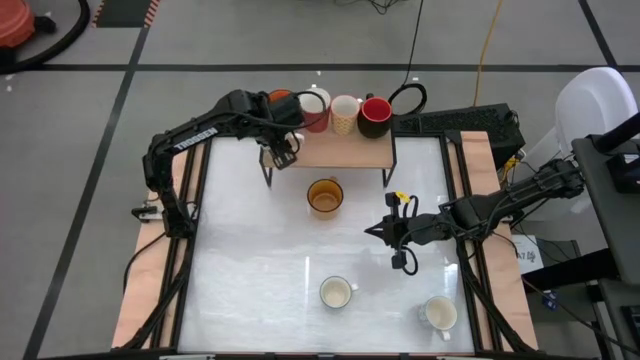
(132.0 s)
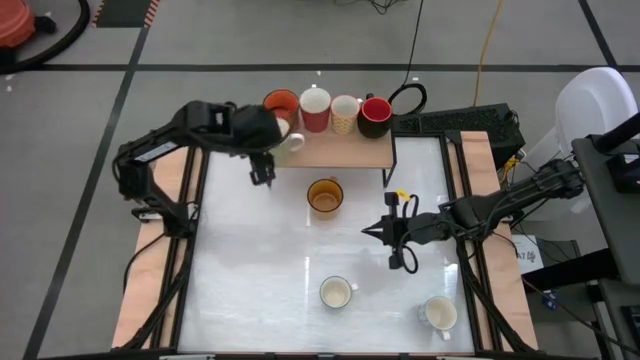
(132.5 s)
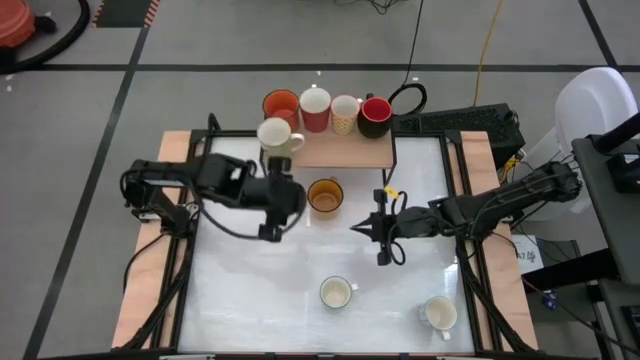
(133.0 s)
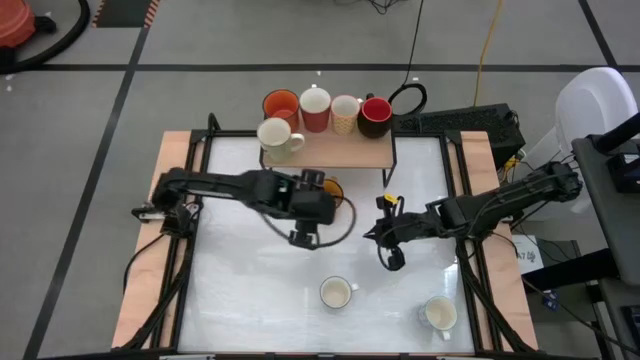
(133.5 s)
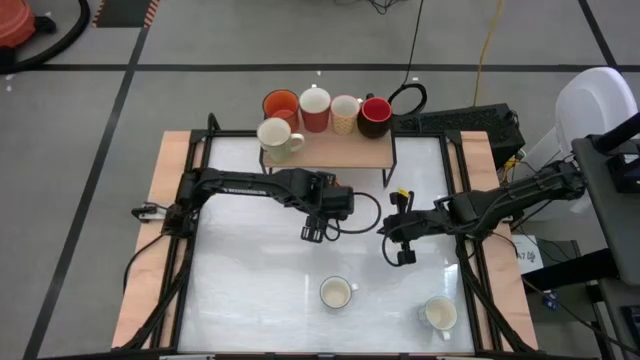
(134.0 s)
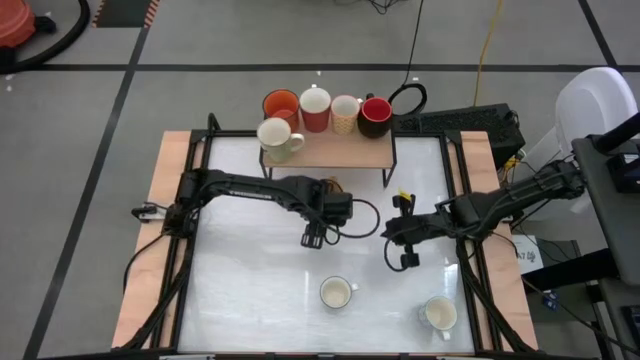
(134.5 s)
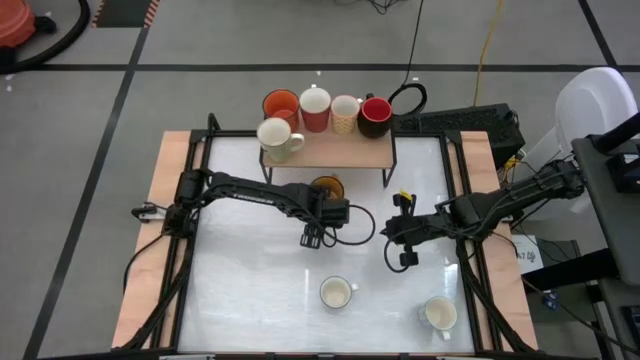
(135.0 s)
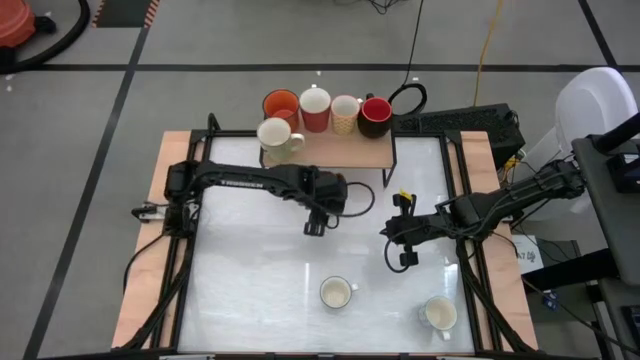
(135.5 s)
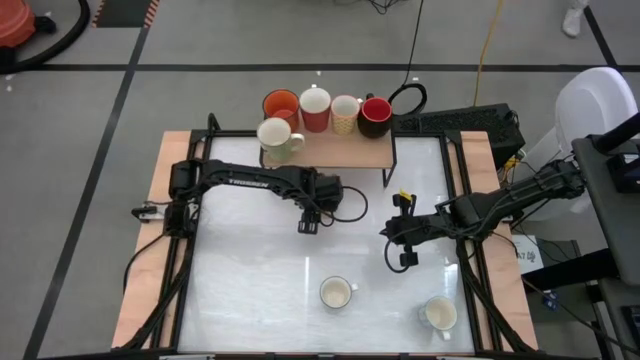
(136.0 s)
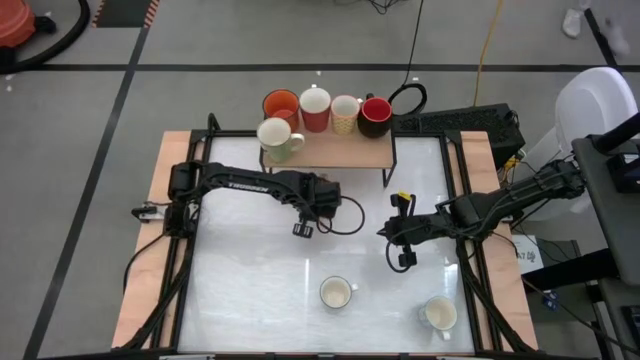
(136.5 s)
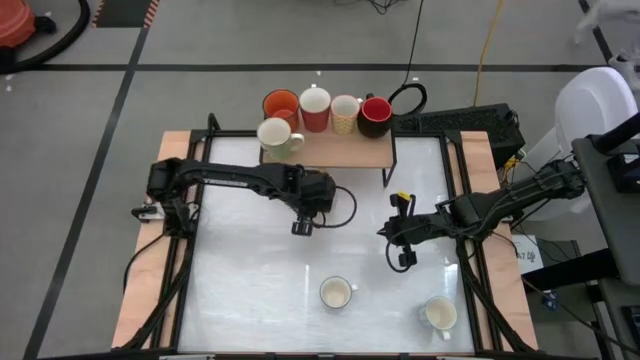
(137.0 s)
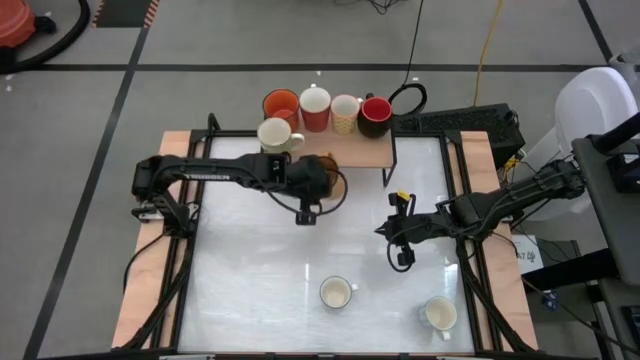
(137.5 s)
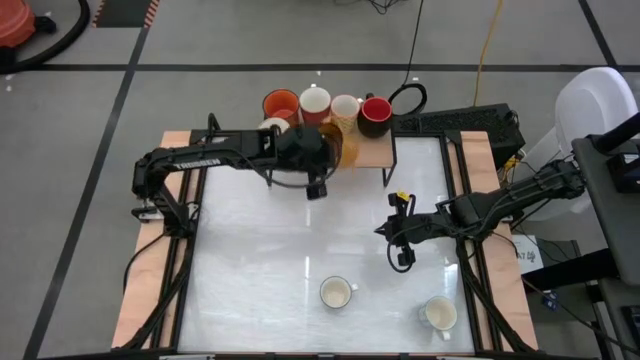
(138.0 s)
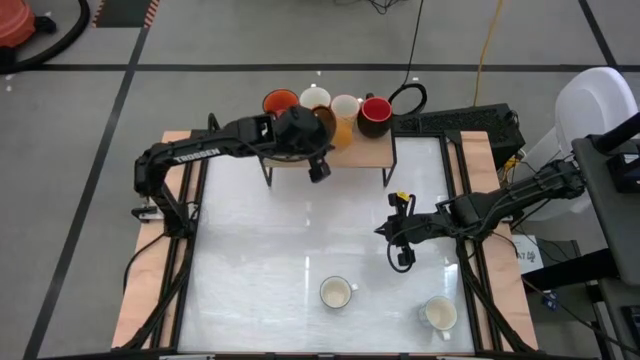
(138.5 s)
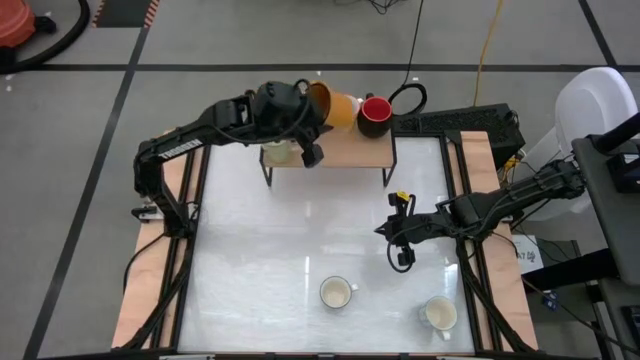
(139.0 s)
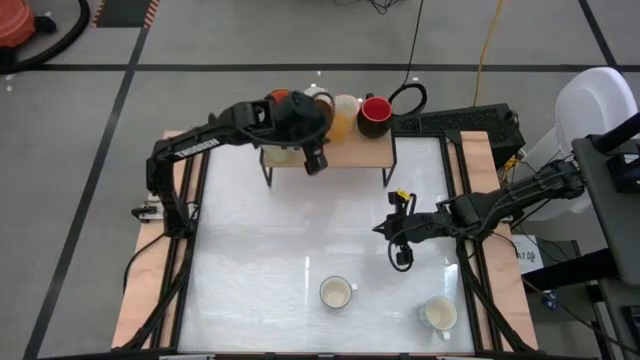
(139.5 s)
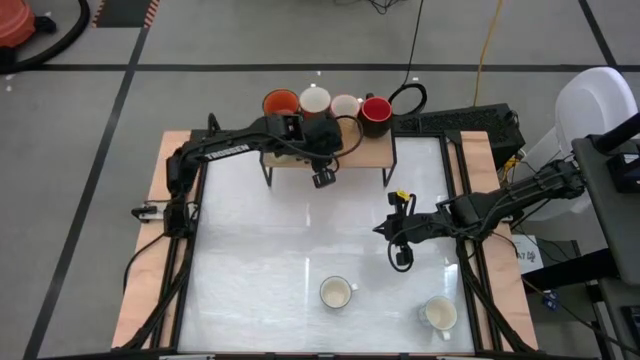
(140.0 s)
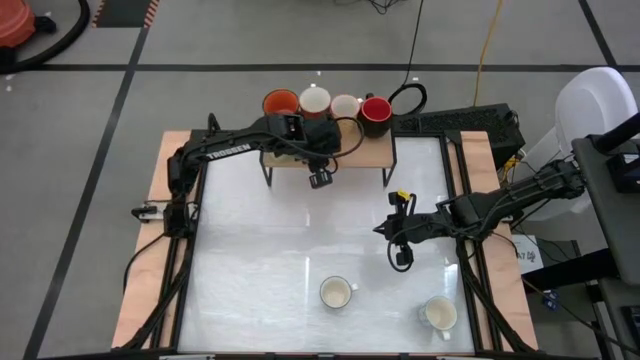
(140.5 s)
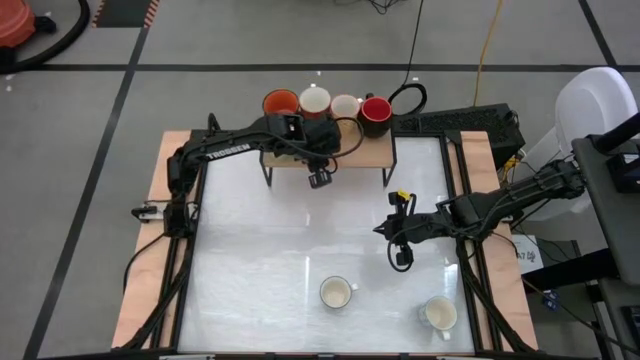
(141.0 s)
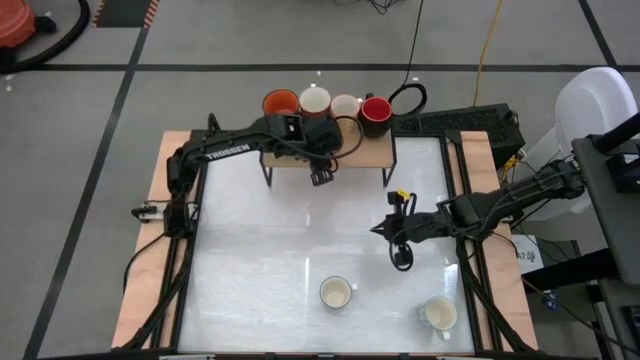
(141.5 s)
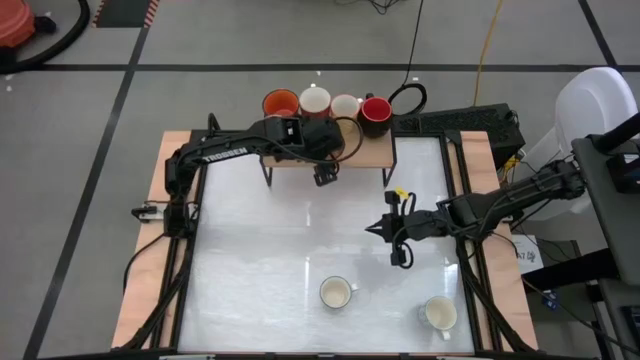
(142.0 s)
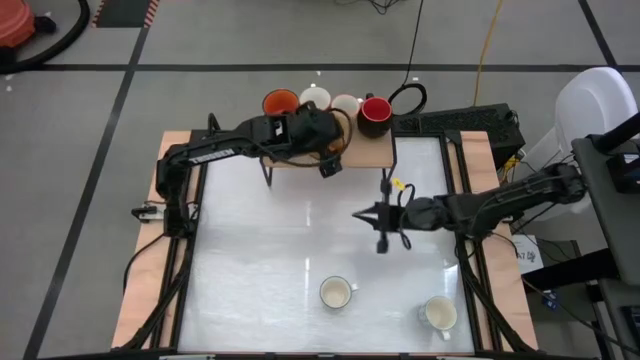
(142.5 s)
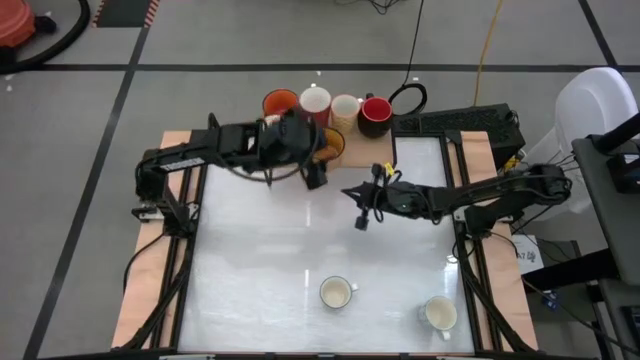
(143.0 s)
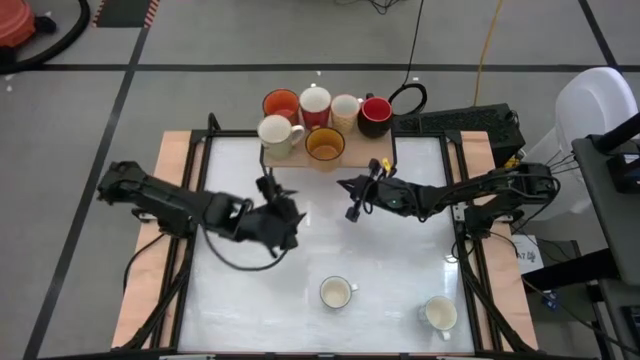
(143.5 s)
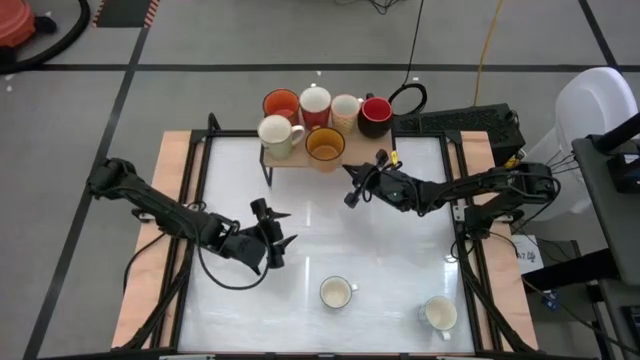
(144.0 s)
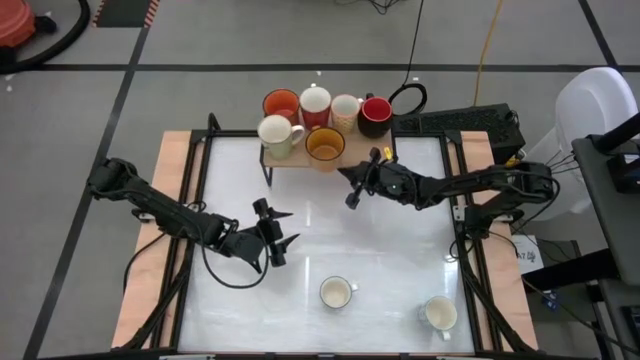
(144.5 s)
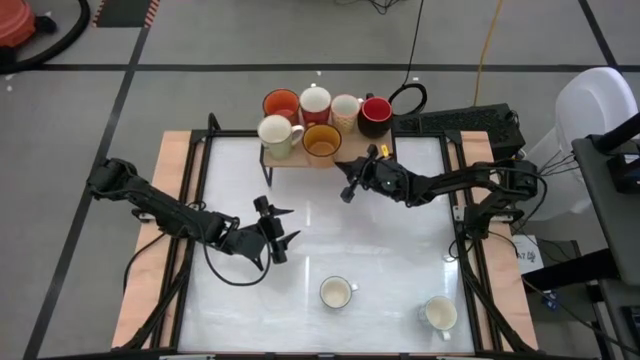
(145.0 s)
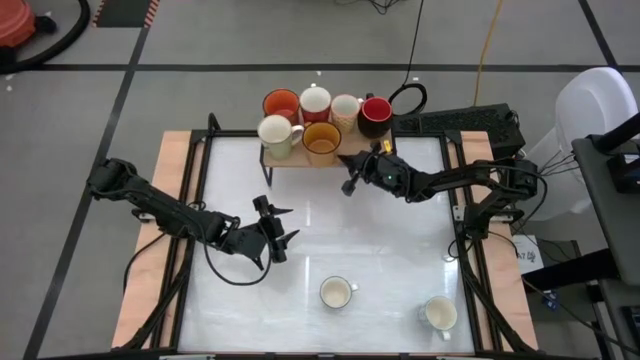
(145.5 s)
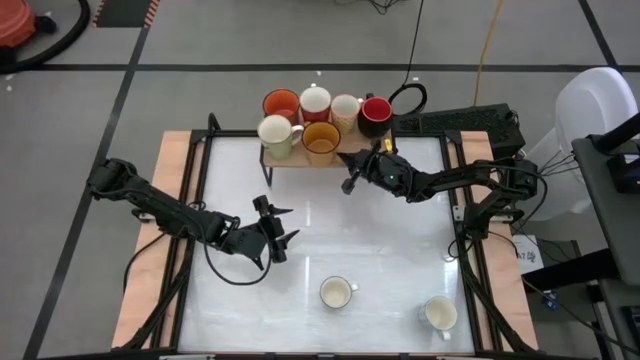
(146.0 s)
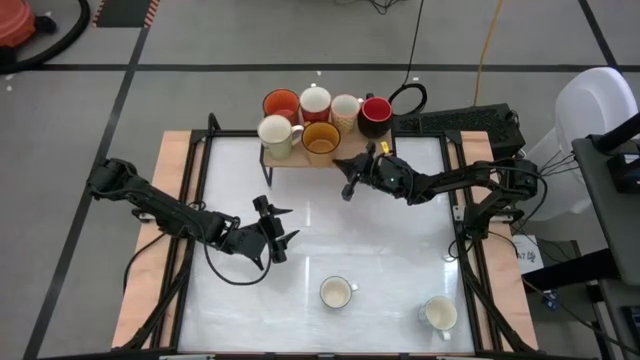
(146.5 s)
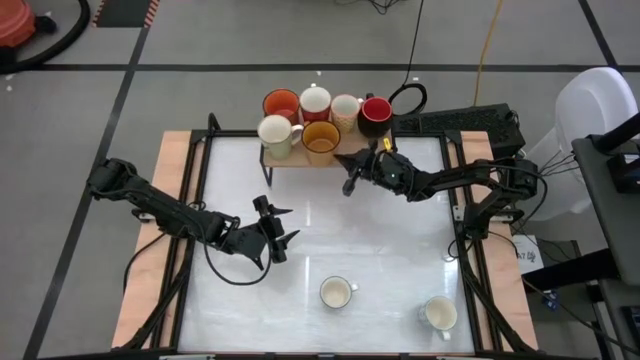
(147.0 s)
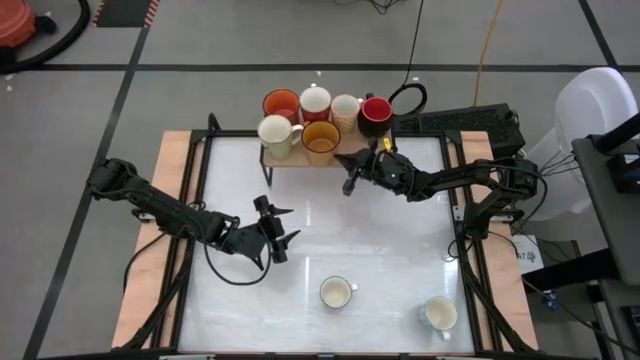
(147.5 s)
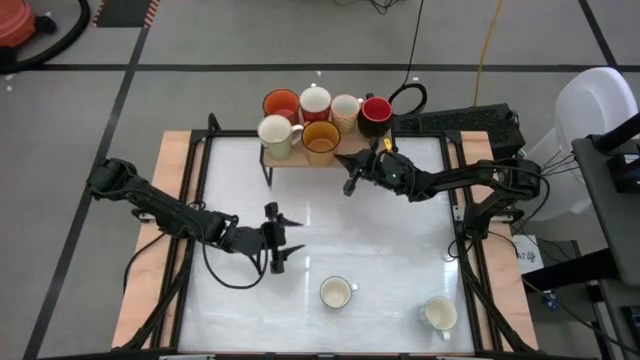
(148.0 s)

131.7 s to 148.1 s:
Task: Place coffee mugs
Put the yellow mug on the shelf

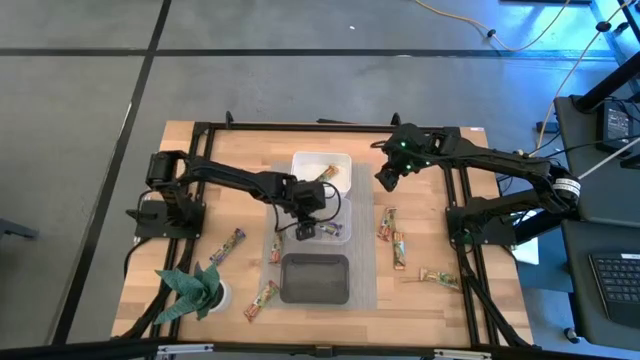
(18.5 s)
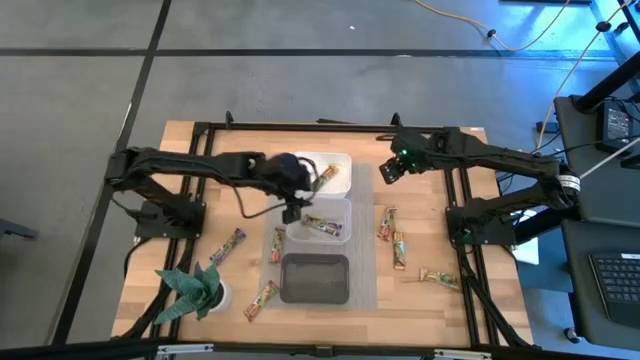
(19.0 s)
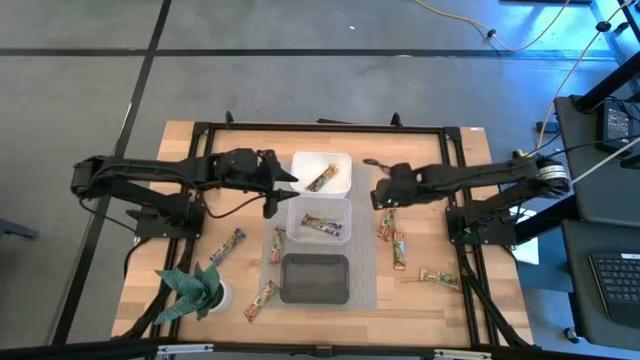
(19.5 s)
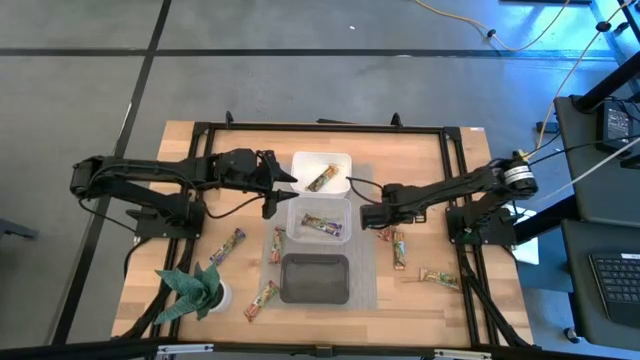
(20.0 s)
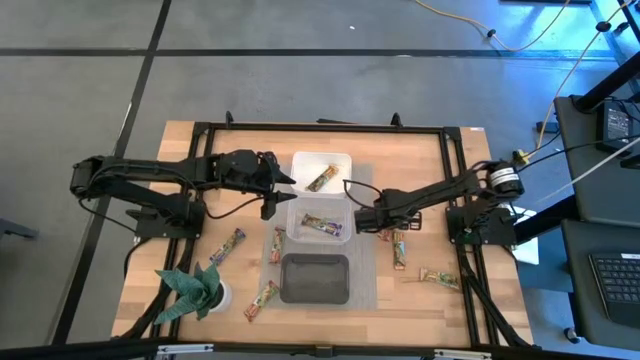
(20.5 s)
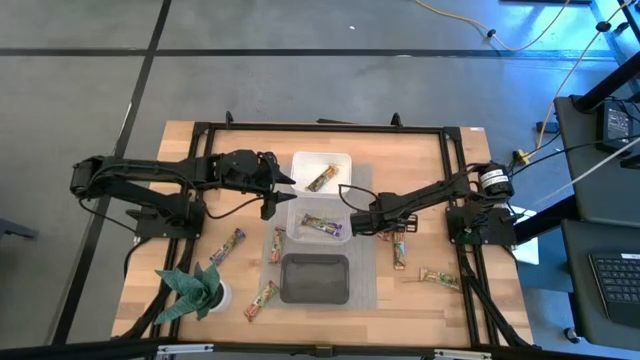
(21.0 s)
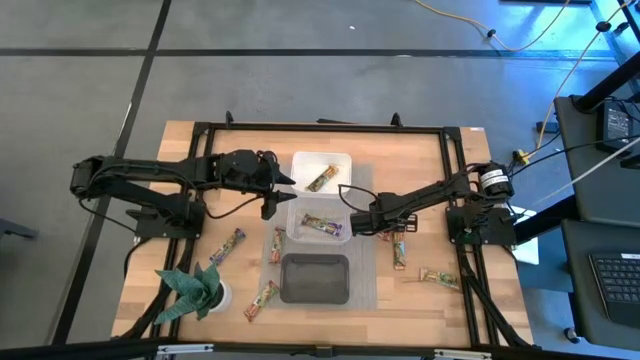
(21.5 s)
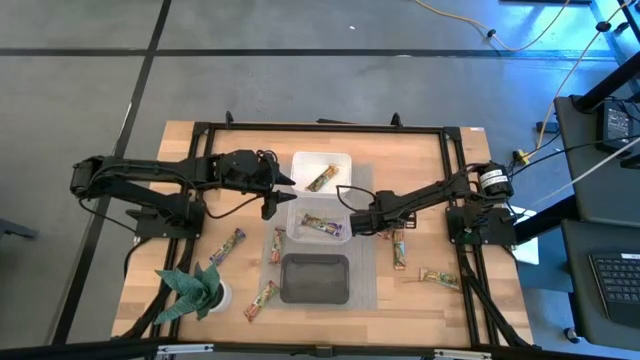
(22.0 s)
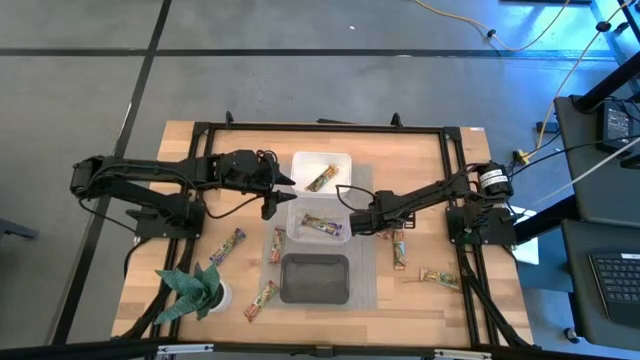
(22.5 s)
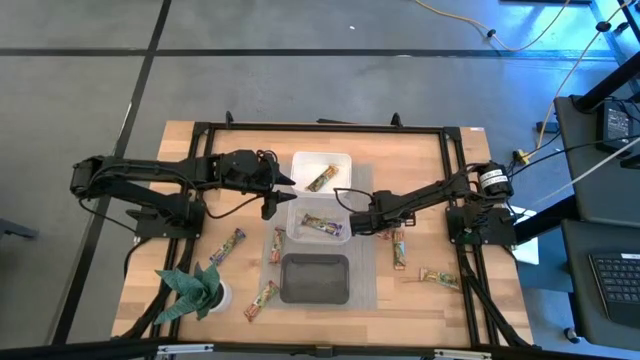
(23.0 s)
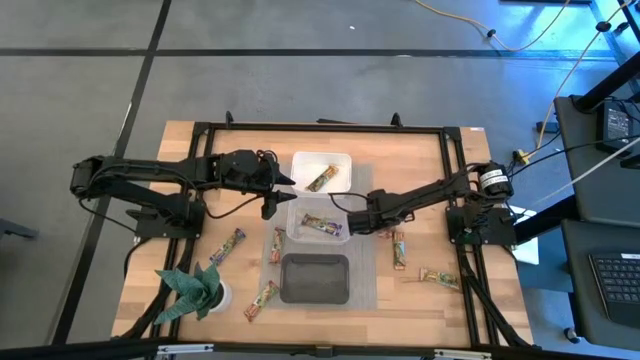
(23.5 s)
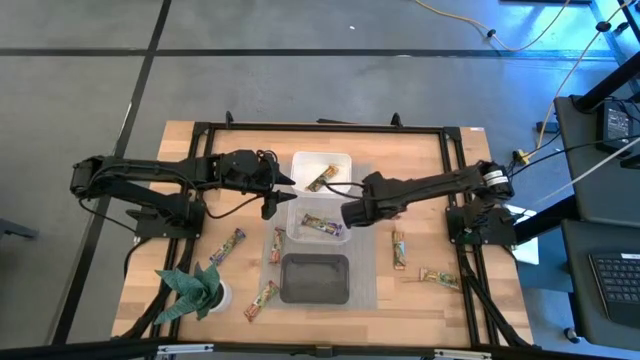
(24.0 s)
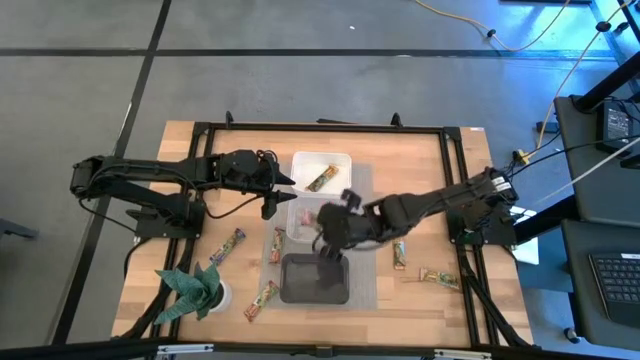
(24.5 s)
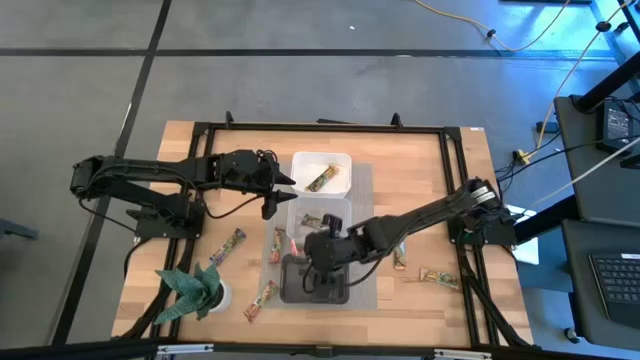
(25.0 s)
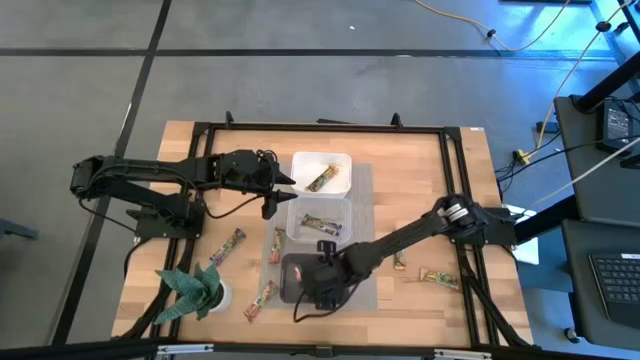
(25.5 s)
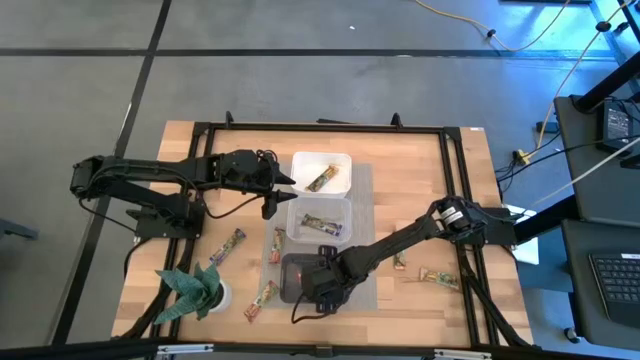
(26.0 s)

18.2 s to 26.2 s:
Task: Pick and place Granola Bars by type
Put the top right red granola bar into the black bin
